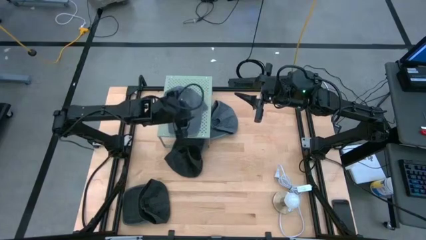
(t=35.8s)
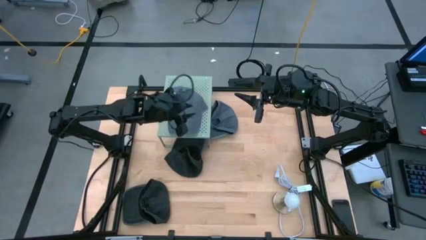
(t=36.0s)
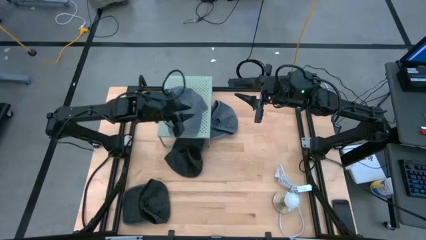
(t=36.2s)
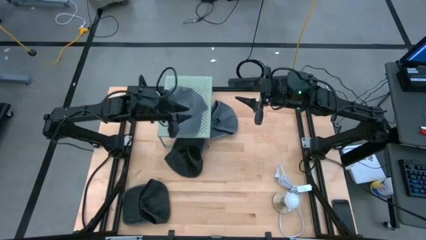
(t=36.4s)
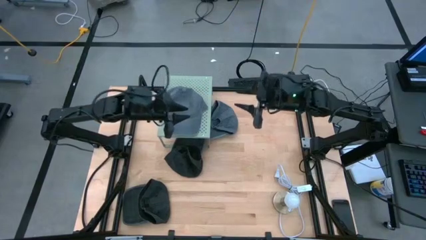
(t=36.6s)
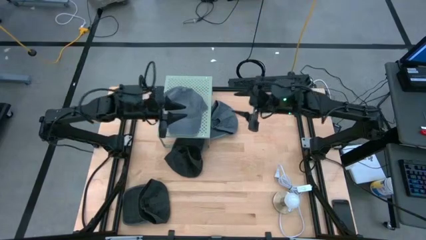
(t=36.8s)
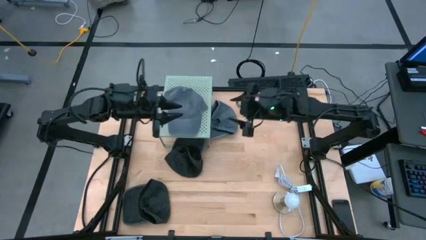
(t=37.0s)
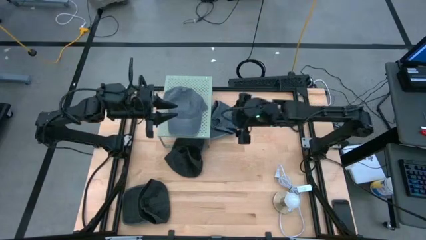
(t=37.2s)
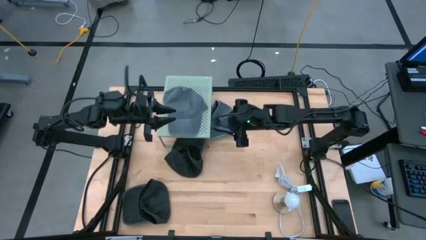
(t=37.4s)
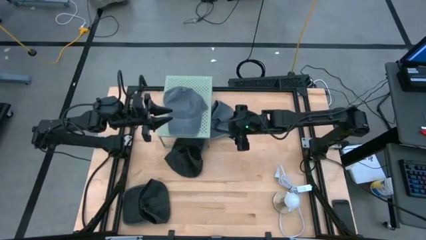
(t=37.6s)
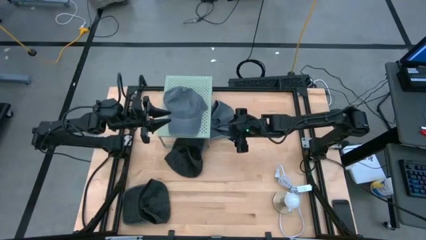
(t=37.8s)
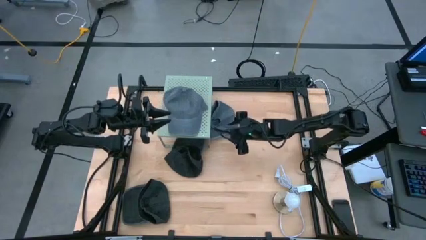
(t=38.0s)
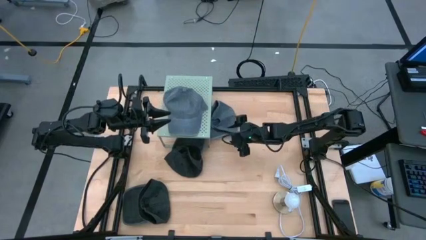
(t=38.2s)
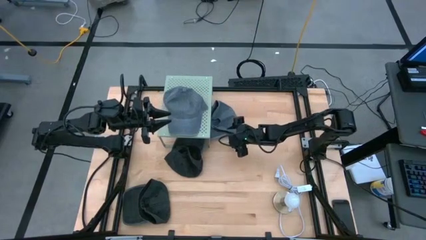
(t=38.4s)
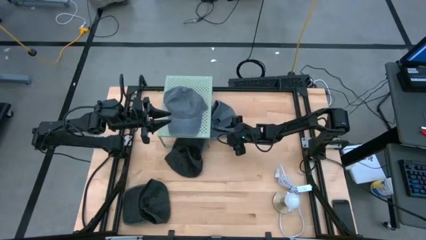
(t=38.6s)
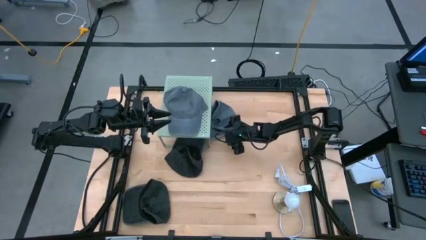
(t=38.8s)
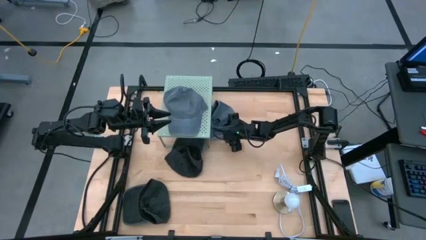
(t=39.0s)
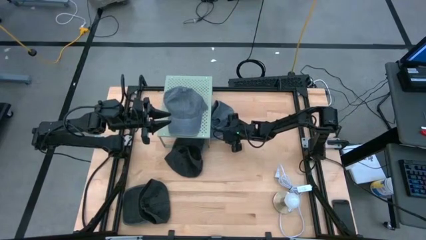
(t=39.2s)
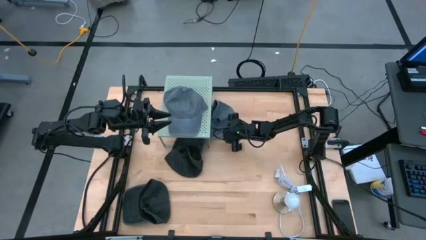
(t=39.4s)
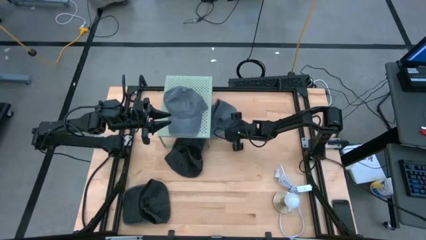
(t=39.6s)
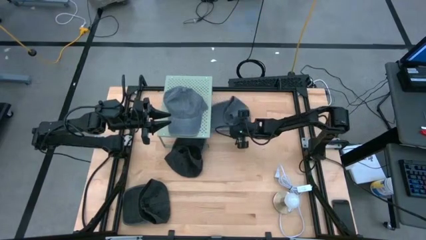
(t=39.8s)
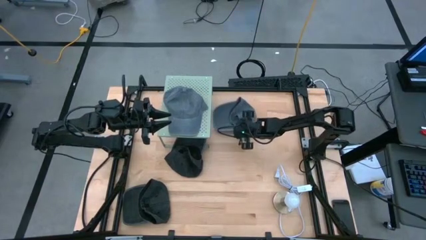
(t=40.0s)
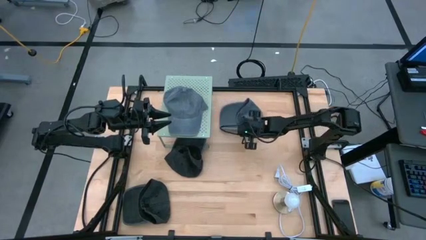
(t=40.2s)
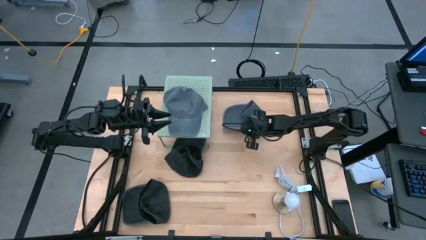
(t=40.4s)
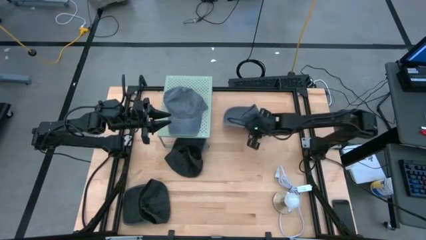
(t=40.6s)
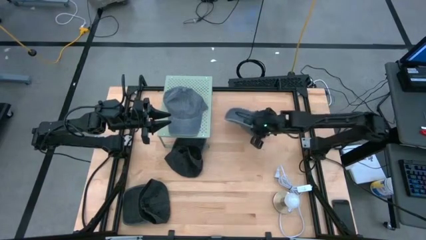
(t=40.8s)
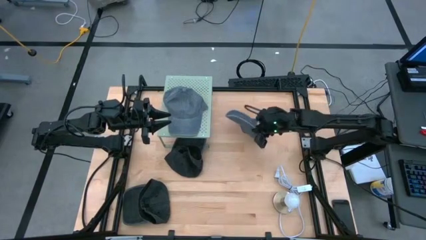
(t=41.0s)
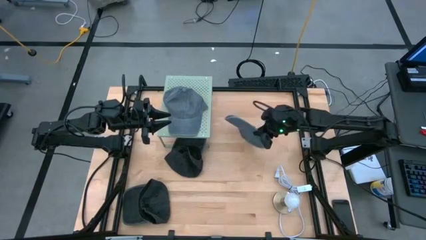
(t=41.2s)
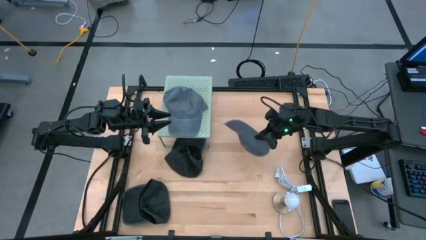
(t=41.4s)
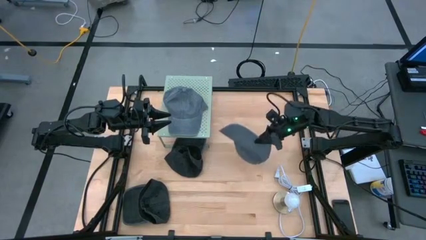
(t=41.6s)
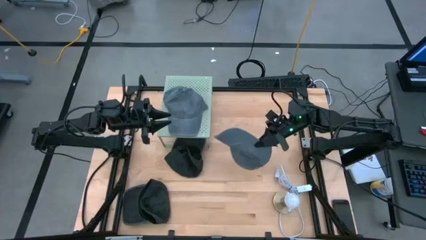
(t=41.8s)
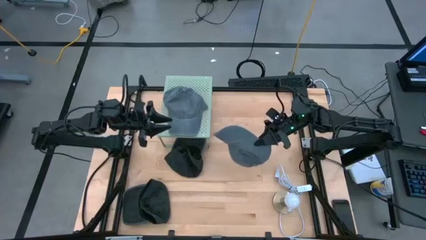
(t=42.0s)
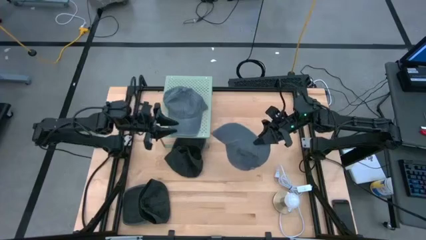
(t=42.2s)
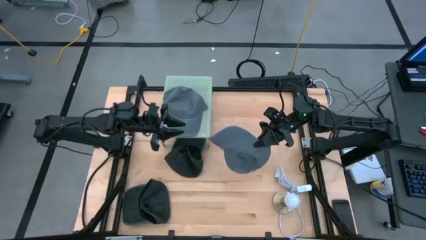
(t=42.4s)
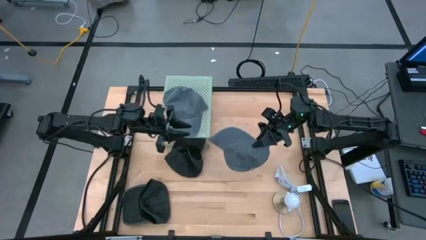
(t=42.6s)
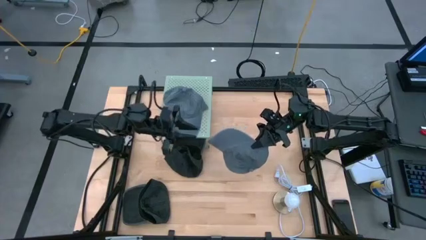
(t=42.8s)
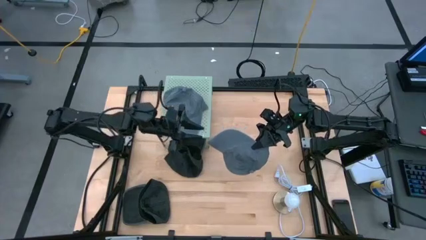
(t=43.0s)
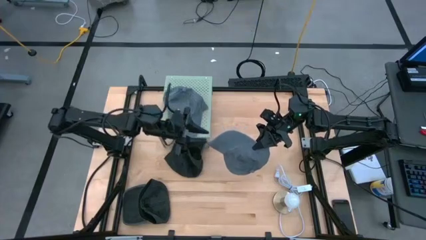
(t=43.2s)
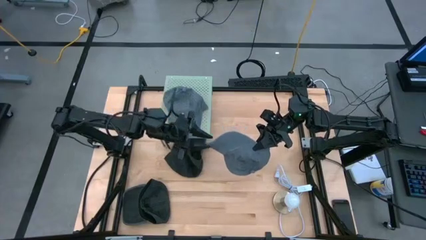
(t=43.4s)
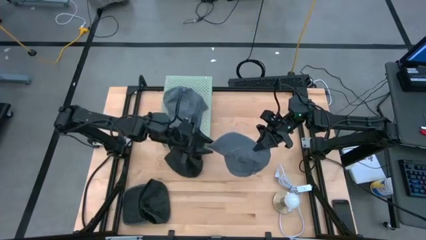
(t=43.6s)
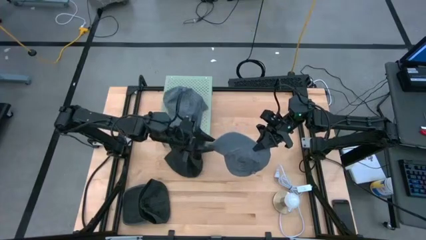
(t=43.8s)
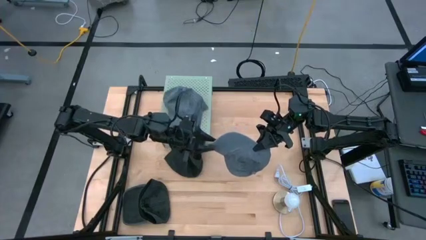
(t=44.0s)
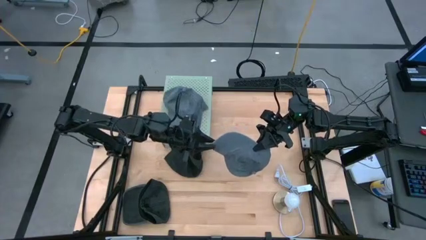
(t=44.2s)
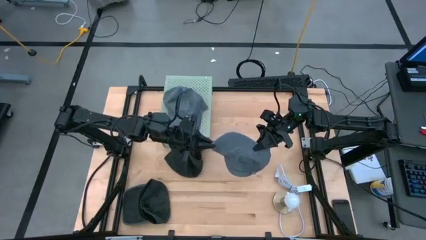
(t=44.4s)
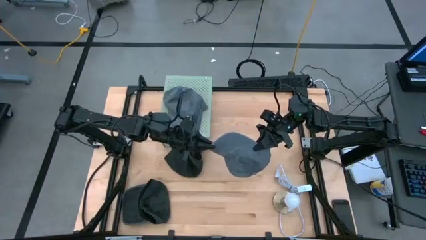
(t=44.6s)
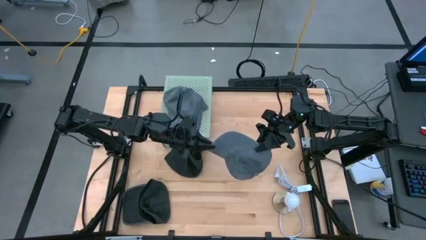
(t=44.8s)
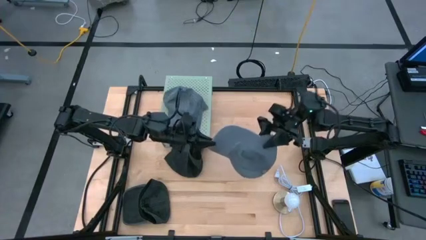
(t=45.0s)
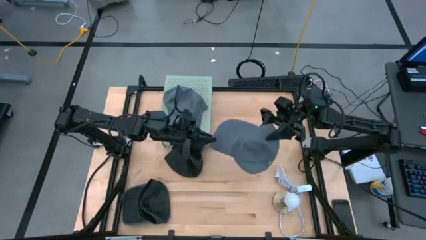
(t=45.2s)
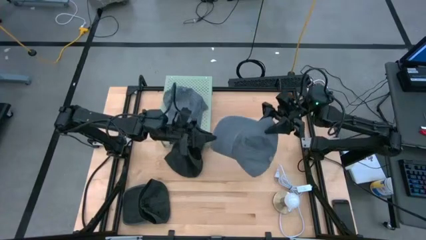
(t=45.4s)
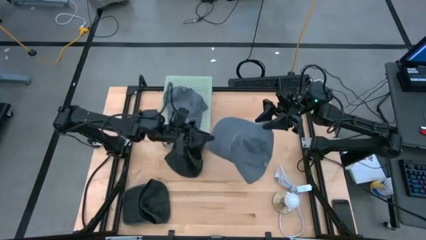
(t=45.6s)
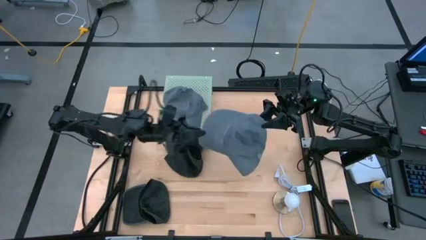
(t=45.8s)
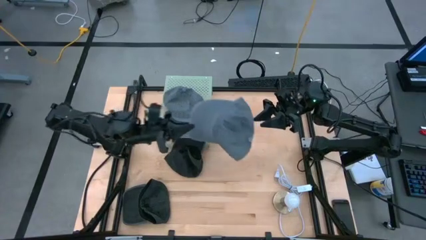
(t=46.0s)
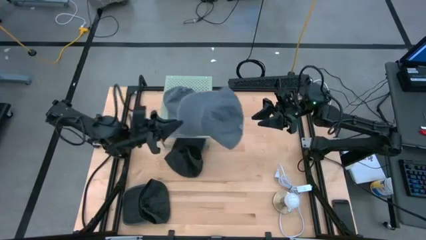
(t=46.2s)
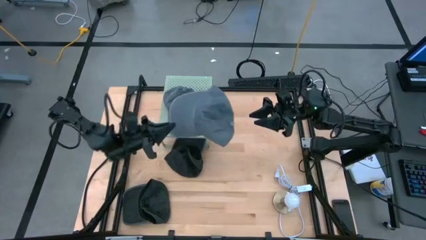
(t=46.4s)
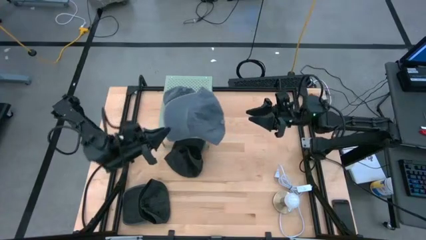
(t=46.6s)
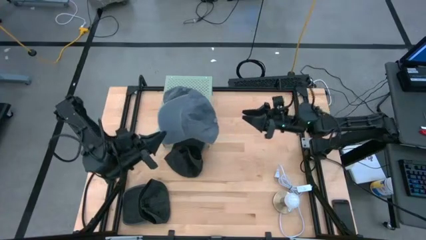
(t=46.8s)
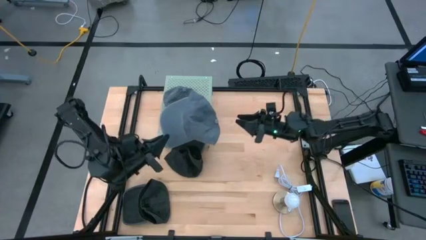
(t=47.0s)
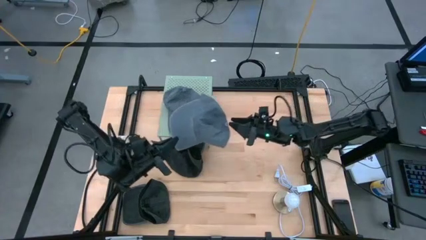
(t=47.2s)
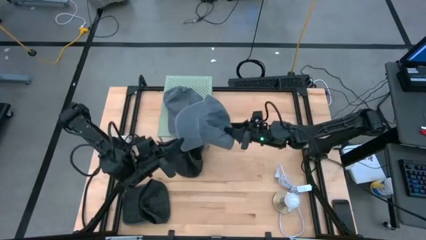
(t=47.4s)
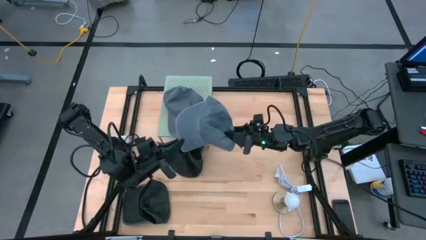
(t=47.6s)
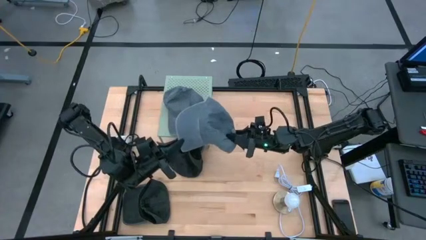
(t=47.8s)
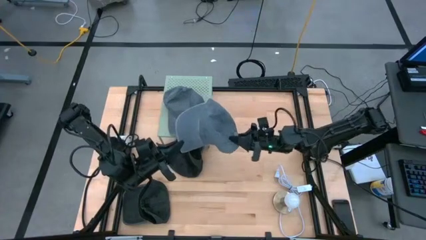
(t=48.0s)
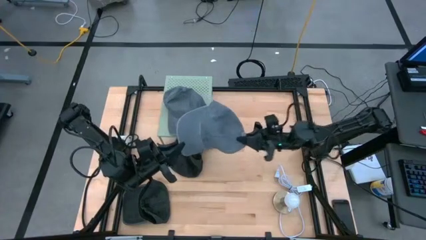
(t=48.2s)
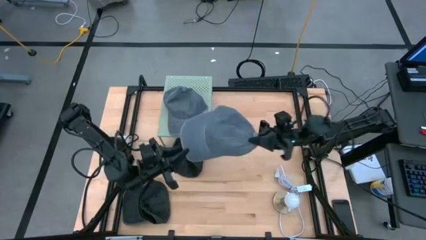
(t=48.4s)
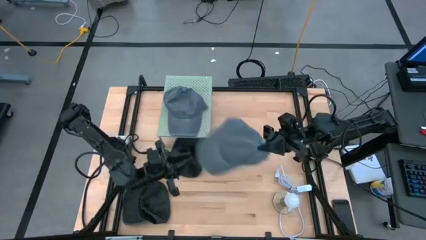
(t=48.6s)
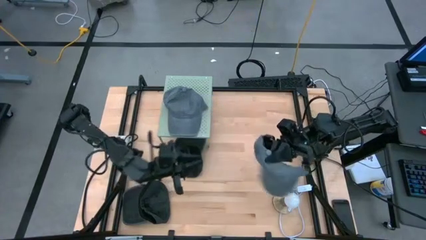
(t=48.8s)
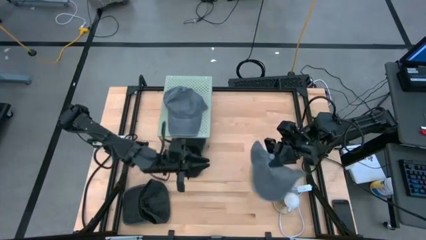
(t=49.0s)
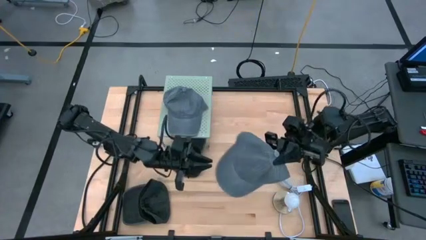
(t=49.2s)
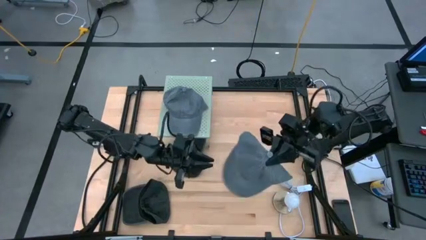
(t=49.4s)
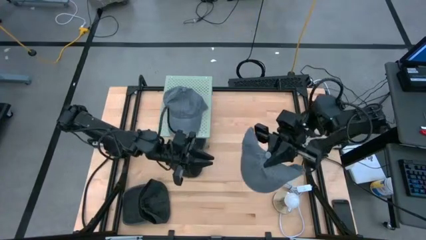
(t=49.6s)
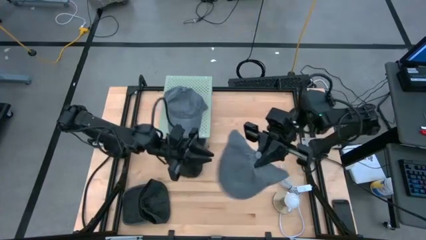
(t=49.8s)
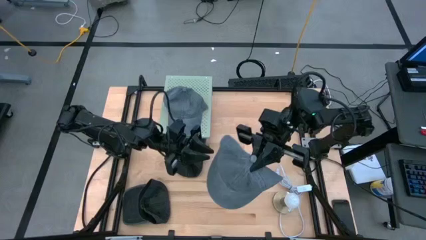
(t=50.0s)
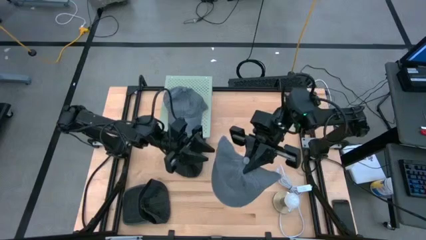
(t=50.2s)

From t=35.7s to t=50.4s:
Task: Pick & Place hat
Stack the gray cap on the gray cap on the shelf
